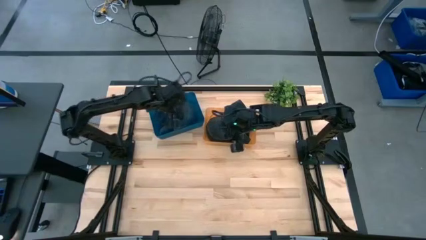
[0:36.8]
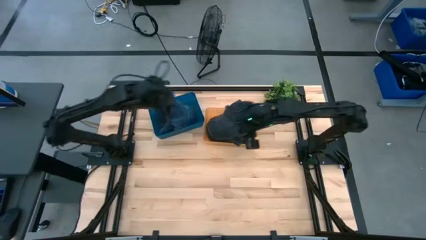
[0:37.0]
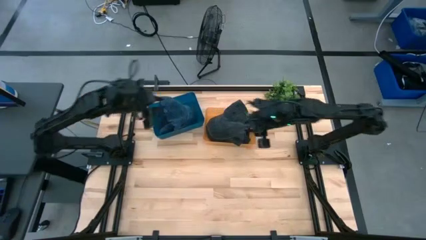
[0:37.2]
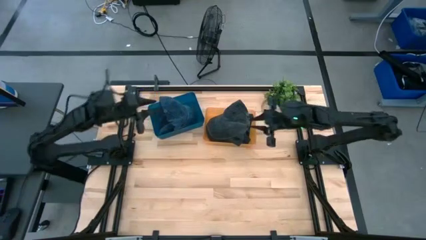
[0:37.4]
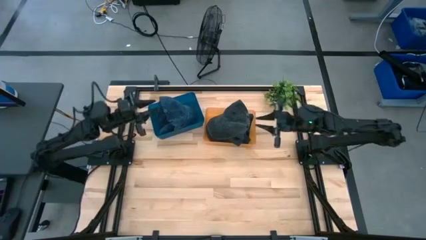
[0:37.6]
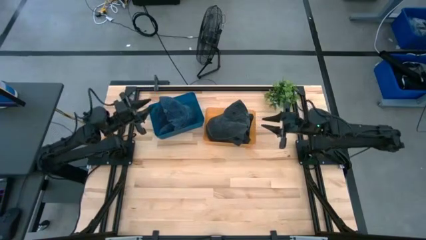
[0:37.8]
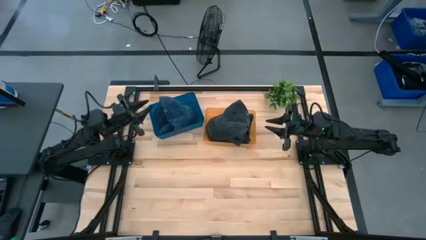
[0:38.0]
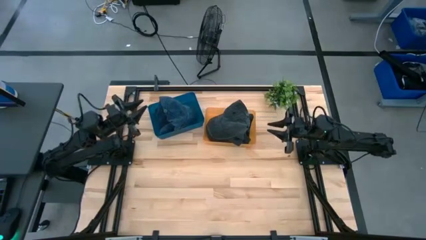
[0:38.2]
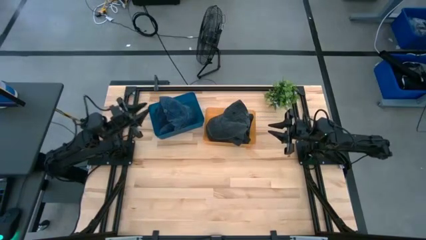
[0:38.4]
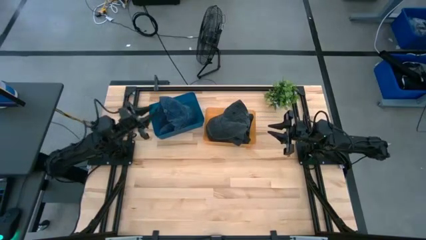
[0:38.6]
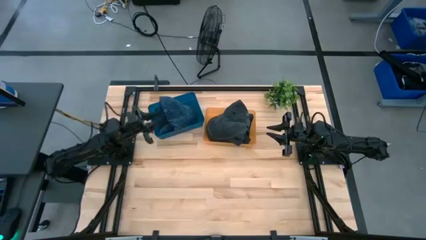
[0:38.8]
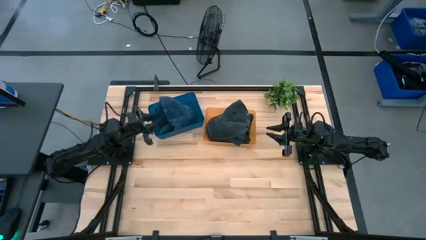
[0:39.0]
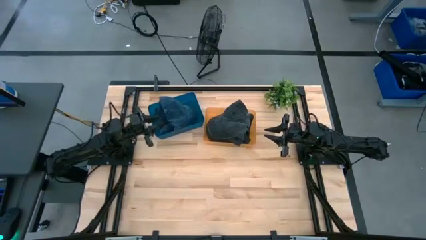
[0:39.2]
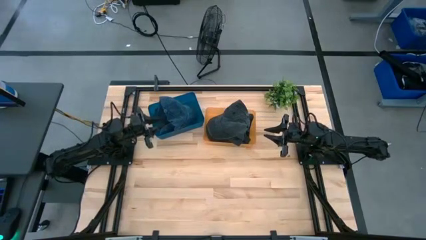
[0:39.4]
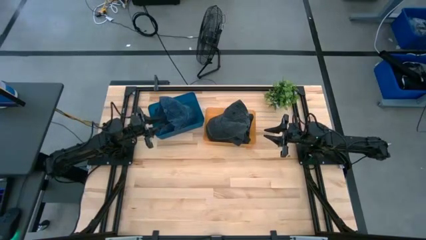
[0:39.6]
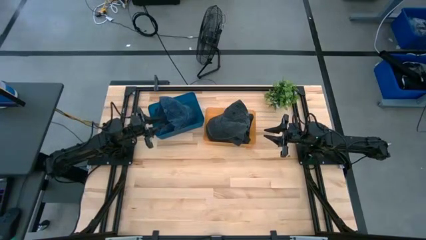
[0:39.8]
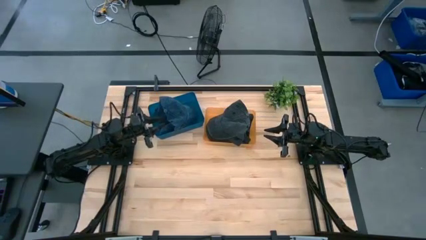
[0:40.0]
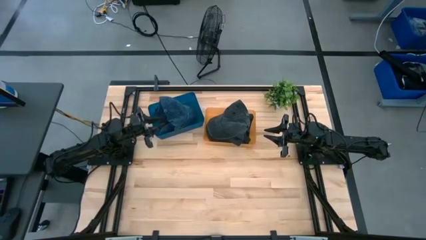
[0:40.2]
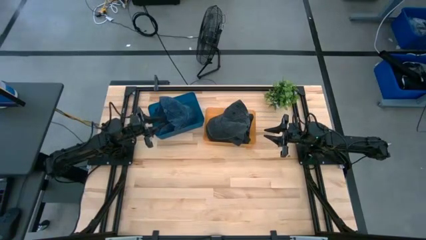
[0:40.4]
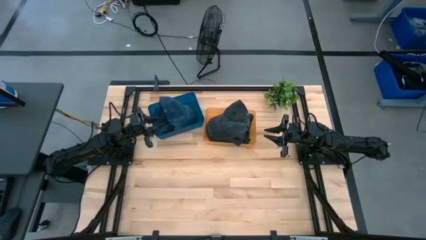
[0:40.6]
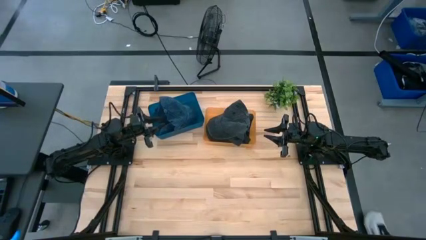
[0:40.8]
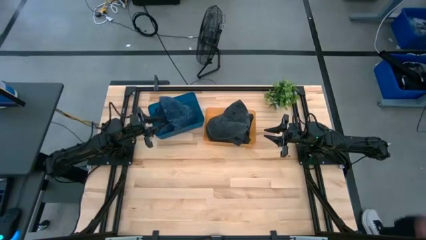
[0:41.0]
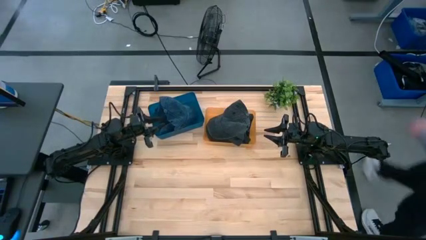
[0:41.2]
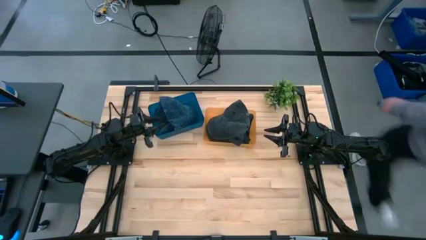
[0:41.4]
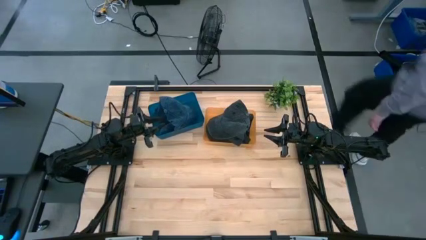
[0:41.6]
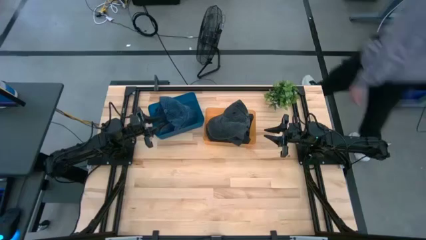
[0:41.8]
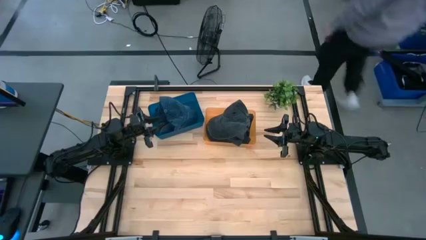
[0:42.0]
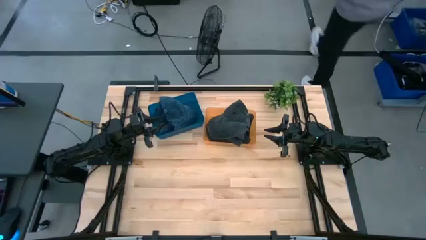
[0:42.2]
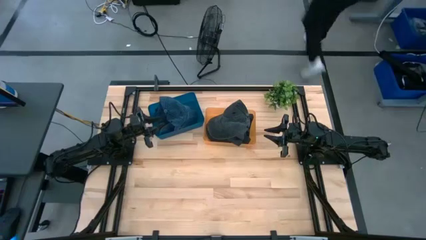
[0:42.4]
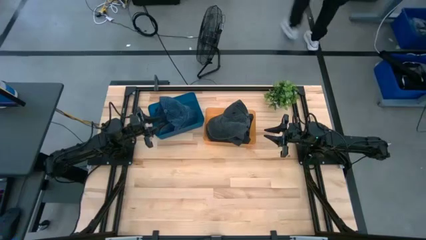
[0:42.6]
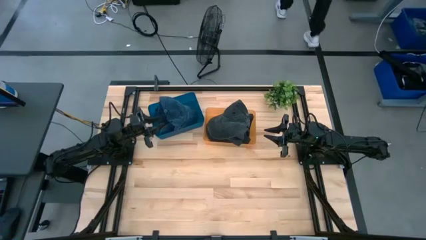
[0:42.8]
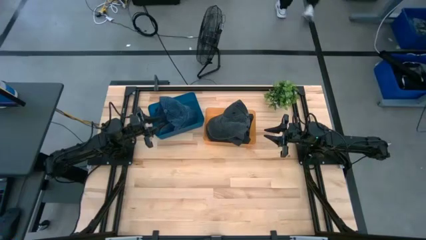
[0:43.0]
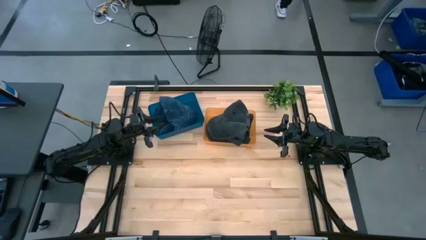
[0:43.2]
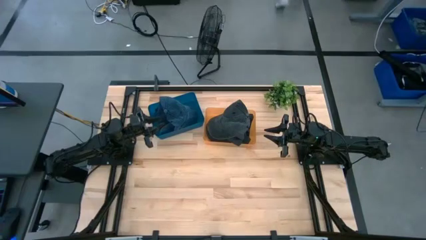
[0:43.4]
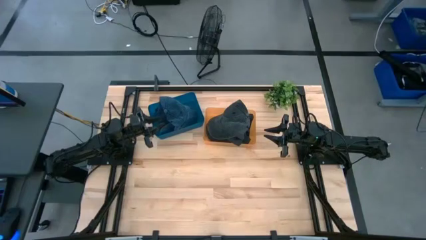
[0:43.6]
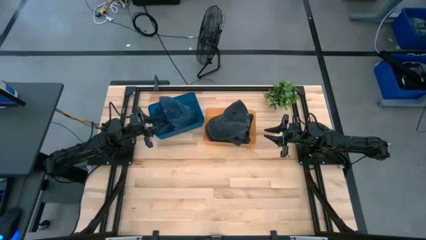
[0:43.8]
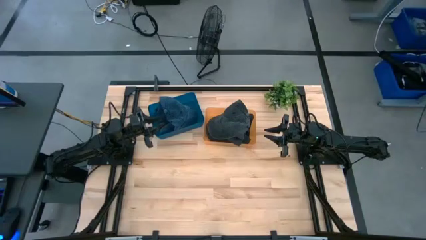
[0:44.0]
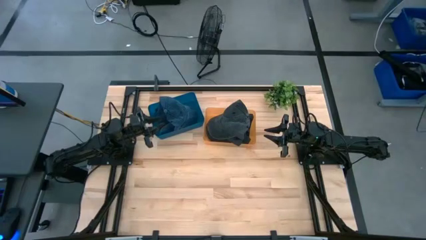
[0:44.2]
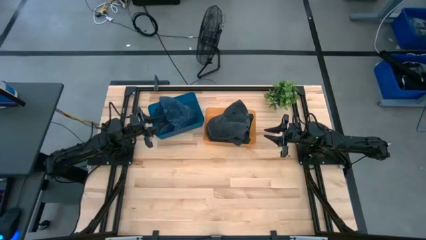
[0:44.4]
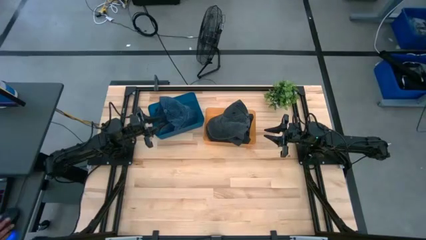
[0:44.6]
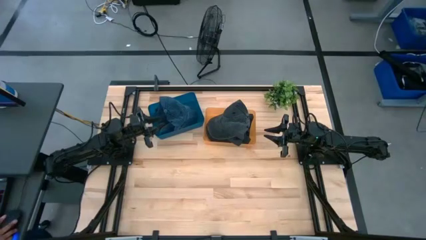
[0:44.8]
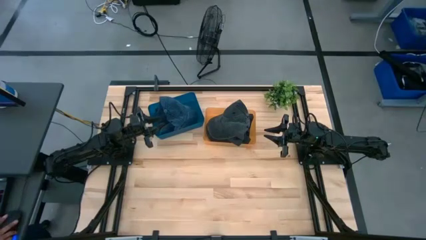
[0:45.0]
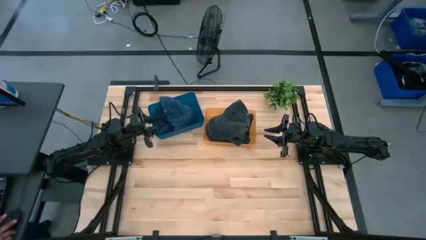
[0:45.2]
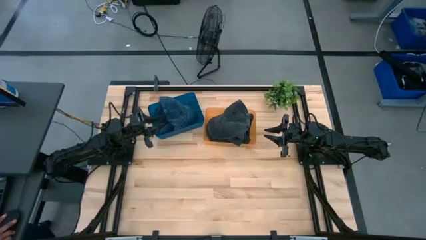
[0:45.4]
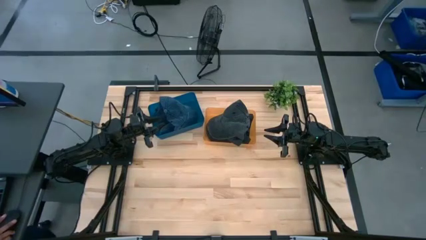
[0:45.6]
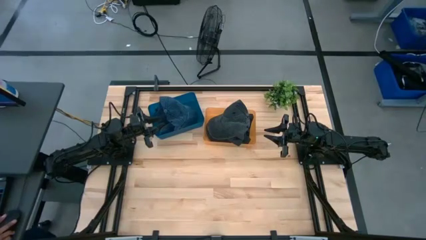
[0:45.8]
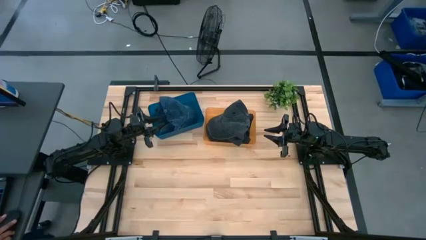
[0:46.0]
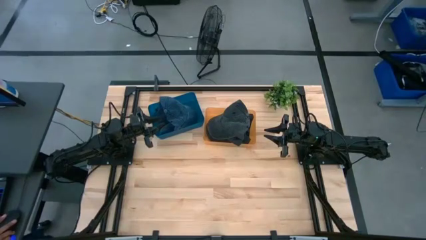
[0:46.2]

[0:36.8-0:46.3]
Task: Pick & Place hat
Return to Home Position

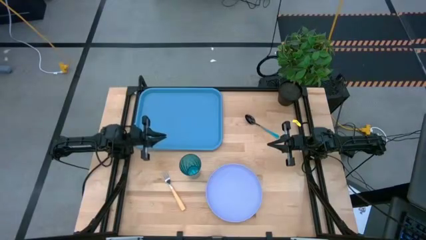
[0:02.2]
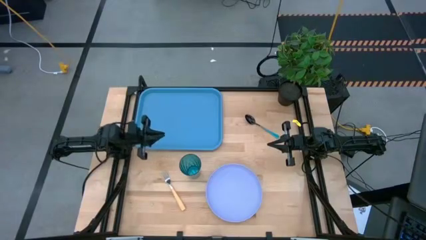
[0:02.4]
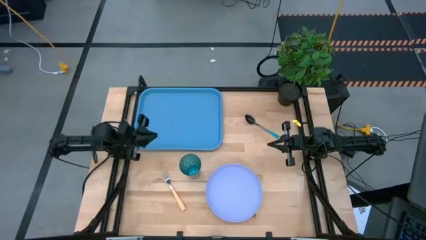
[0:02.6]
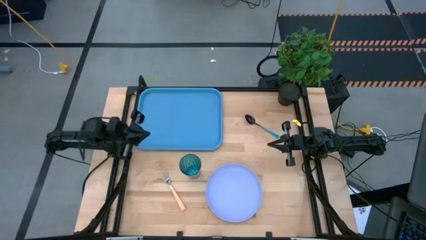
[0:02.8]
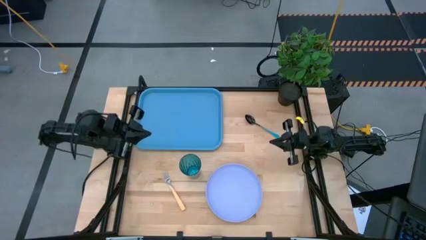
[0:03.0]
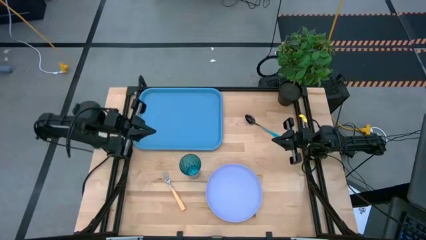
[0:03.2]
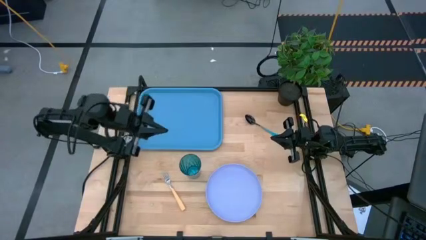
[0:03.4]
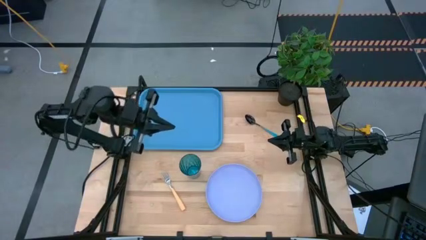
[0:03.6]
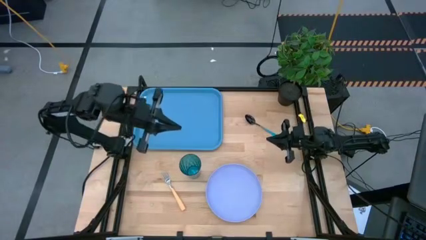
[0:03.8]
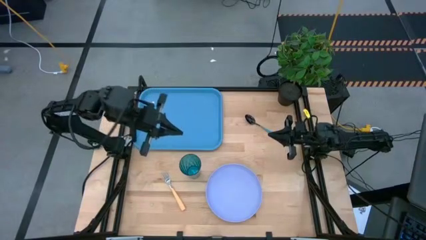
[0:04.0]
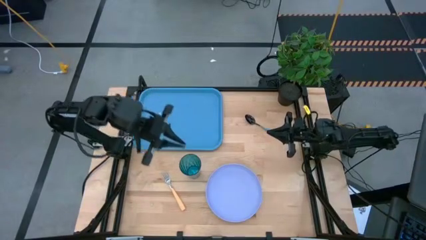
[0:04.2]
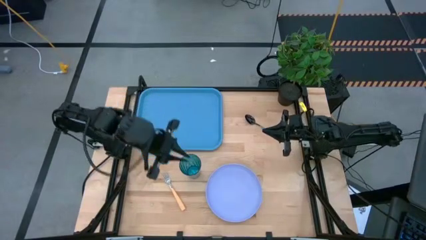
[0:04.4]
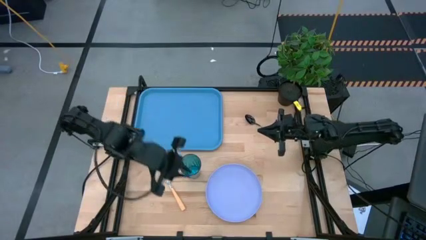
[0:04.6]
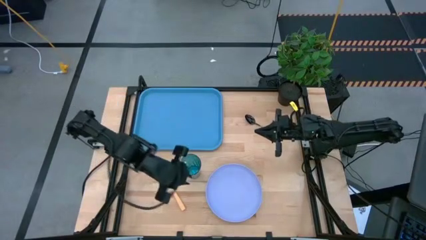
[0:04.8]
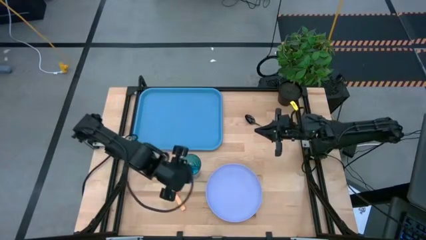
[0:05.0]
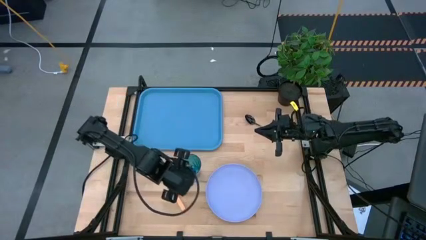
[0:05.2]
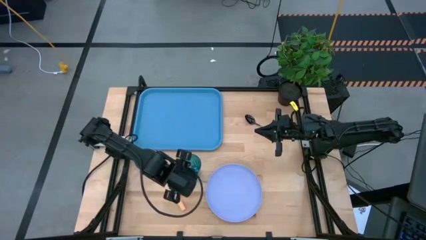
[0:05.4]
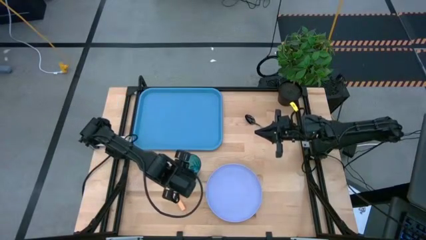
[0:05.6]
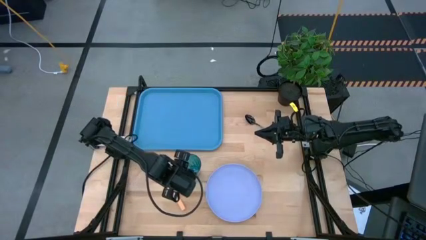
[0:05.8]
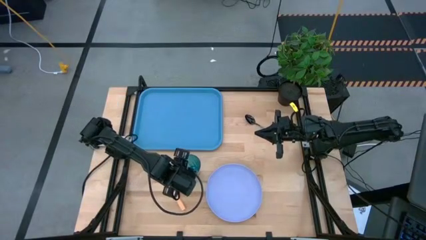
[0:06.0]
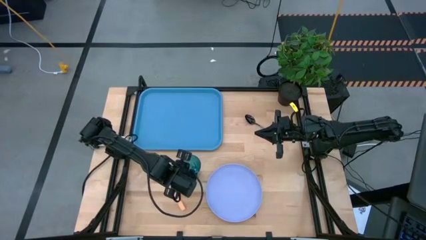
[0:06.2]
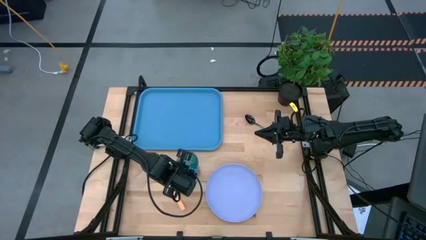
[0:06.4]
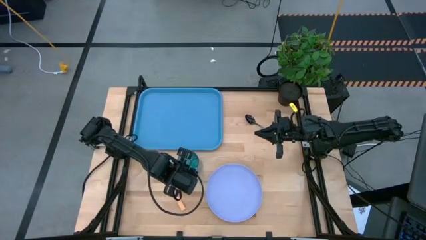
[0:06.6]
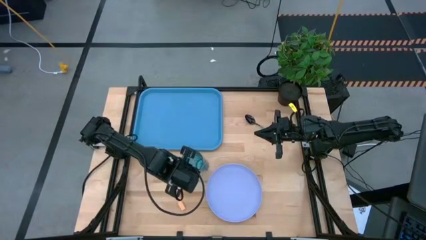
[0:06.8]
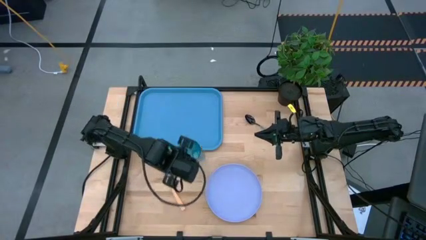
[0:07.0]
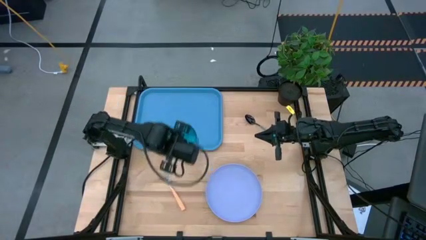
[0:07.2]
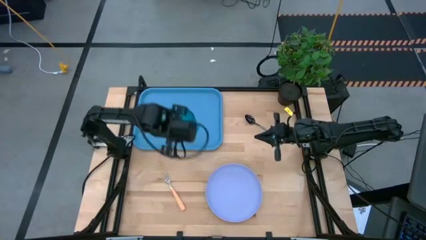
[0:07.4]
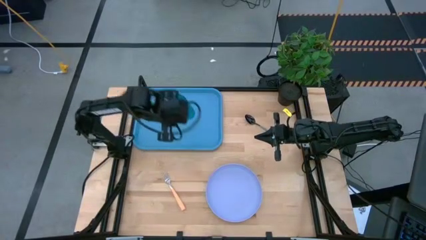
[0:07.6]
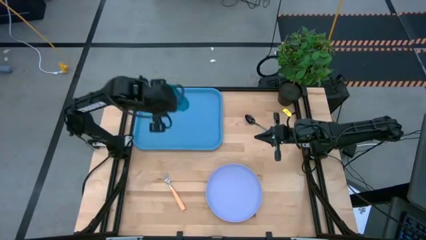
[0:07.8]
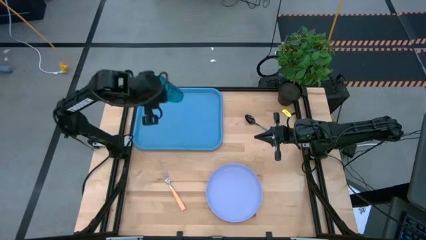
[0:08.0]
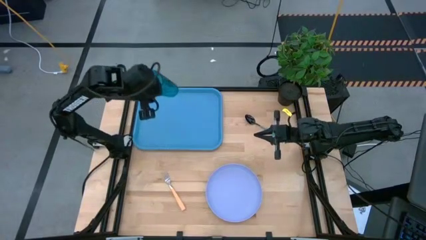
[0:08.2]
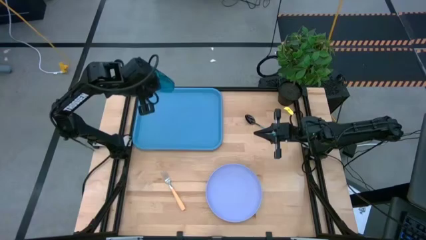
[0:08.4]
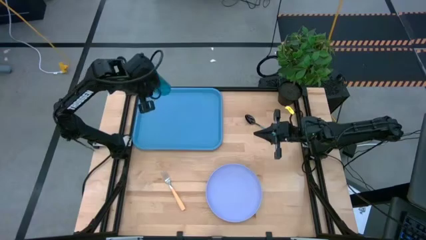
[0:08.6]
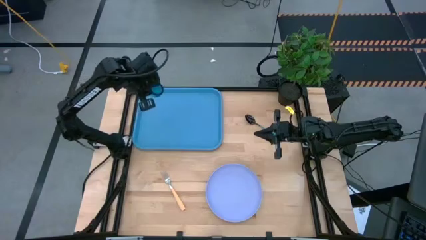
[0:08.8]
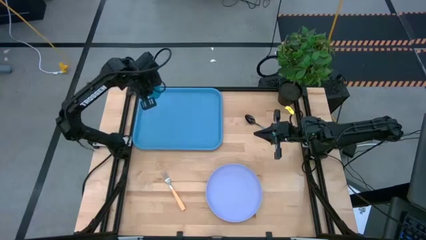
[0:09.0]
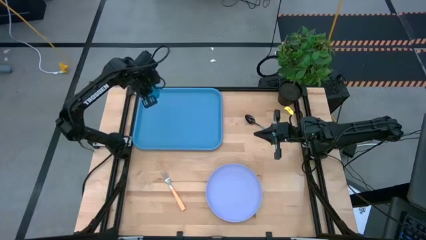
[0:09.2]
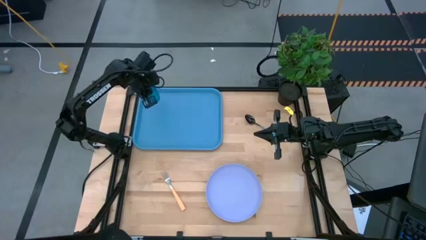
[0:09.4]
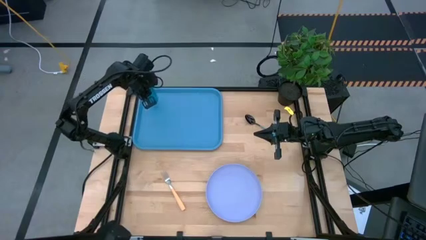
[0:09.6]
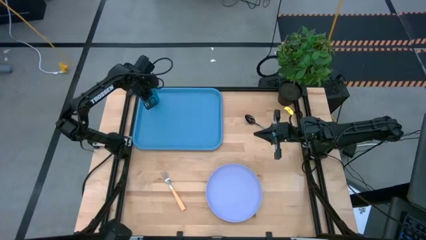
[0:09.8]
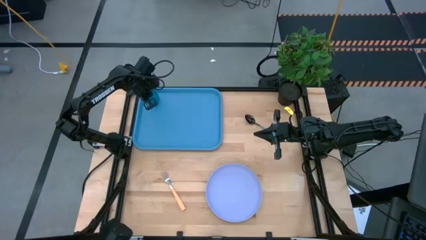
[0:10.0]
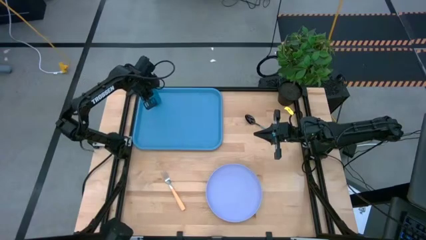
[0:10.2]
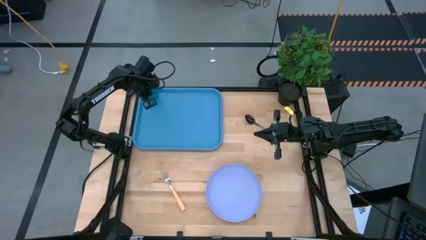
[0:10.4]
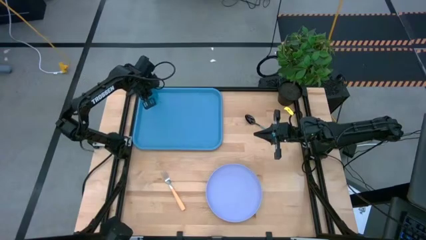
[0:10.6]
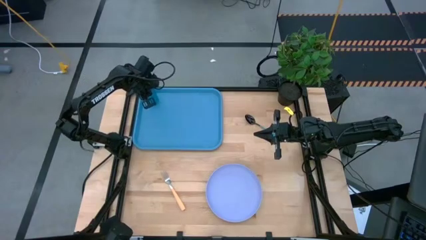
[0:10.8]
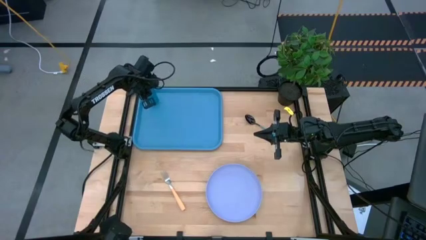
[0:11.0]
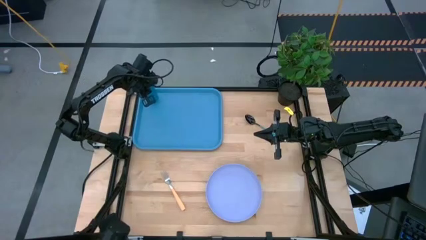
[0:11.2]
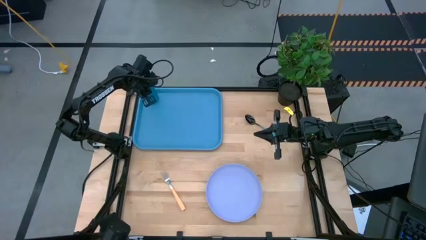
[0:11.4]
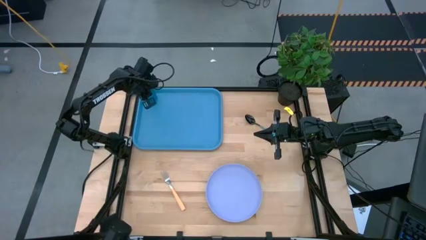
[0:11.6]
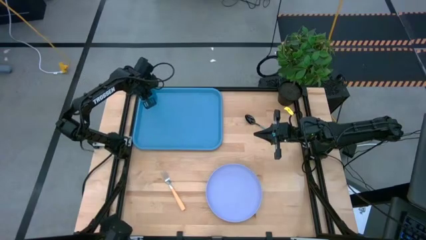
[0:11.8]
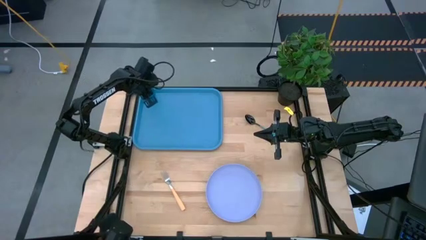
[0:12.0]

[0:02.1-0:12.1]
Task: Pick and place plate/cup/fork/spoon on tray
Put the blue glass cup on the blue tray
